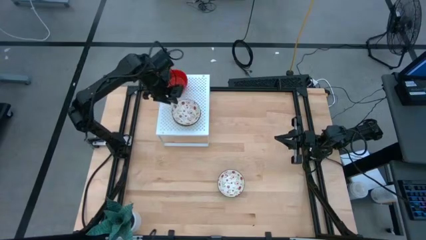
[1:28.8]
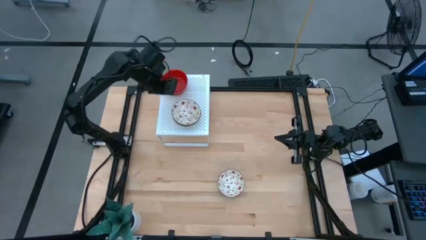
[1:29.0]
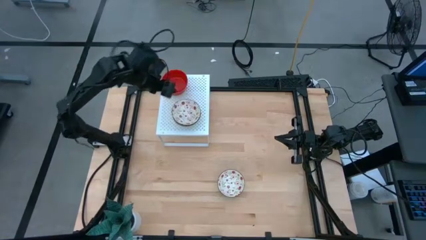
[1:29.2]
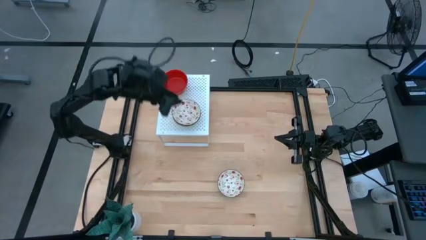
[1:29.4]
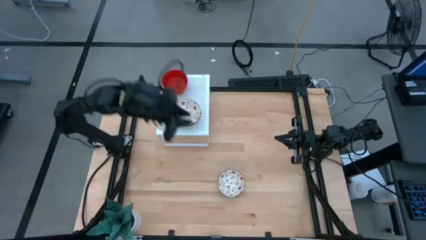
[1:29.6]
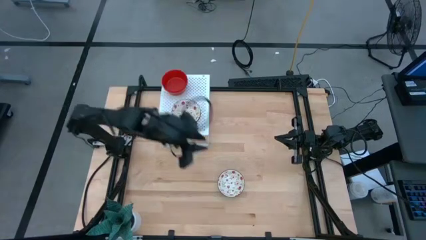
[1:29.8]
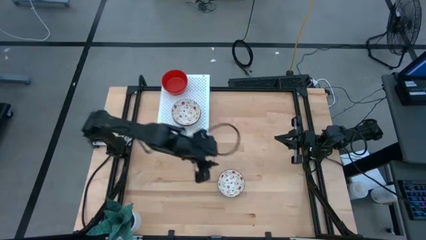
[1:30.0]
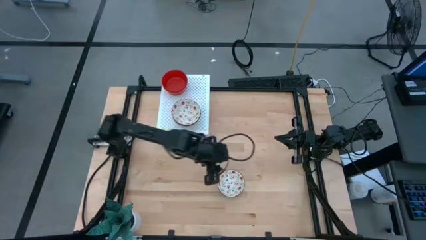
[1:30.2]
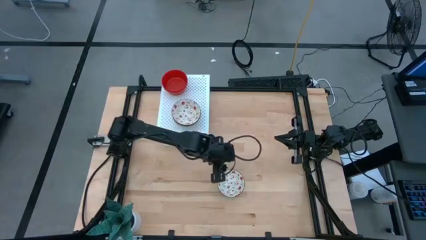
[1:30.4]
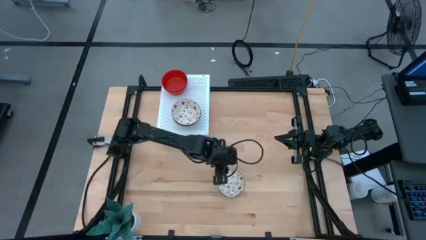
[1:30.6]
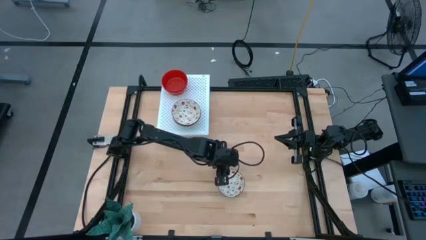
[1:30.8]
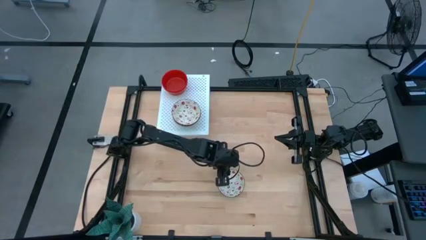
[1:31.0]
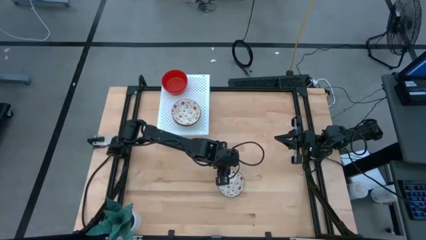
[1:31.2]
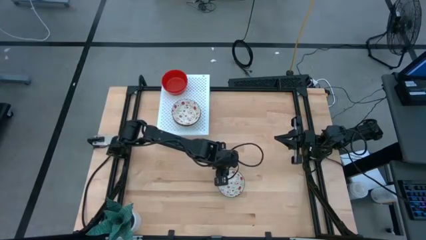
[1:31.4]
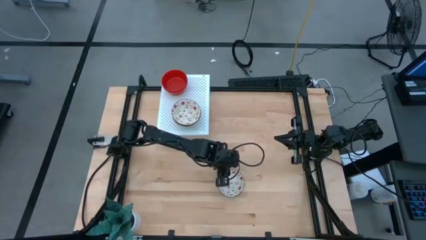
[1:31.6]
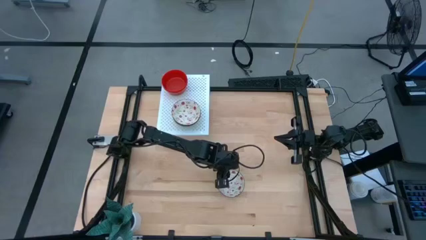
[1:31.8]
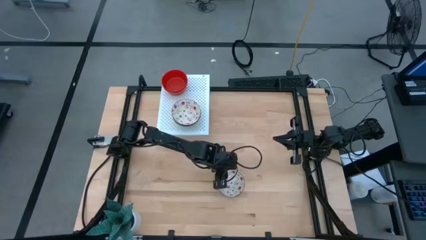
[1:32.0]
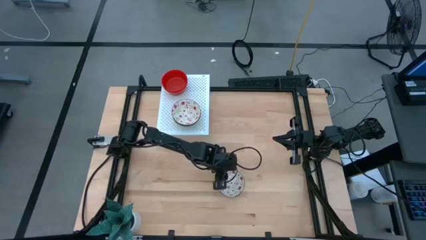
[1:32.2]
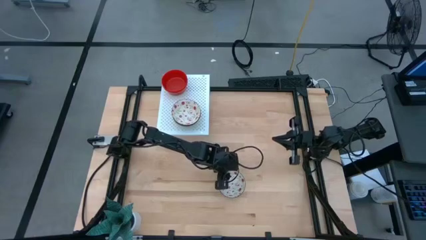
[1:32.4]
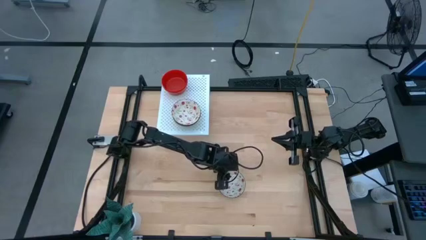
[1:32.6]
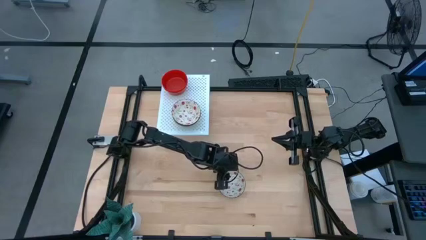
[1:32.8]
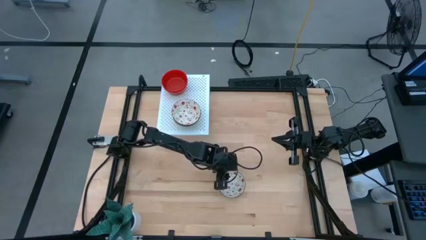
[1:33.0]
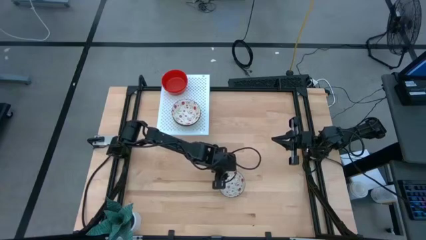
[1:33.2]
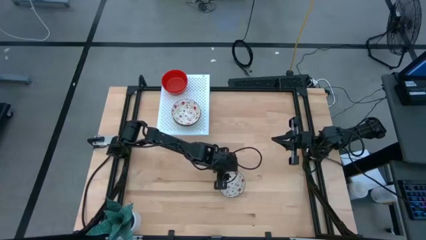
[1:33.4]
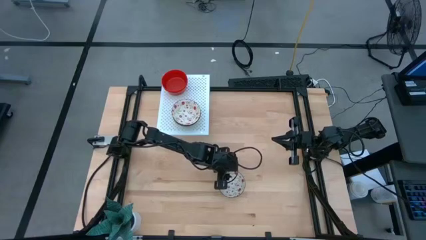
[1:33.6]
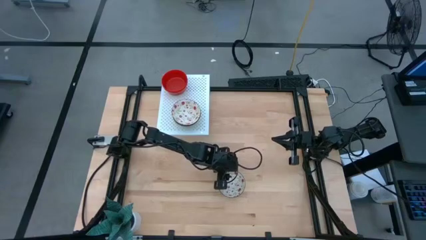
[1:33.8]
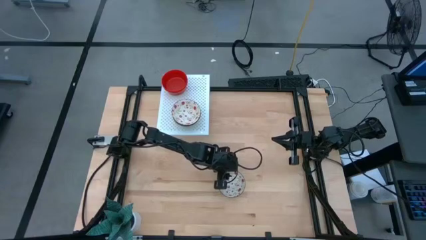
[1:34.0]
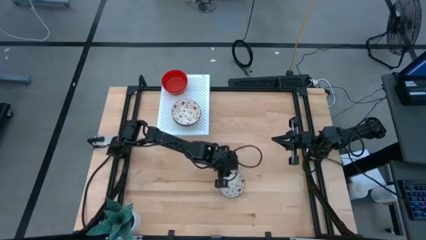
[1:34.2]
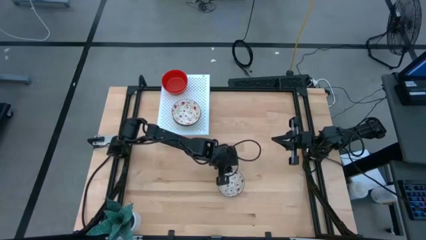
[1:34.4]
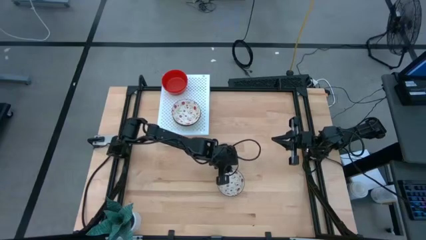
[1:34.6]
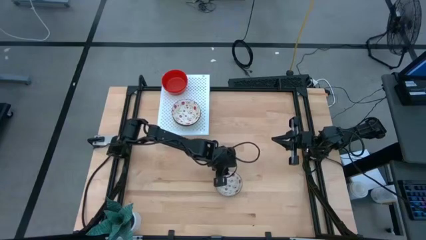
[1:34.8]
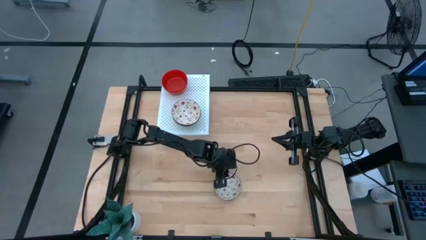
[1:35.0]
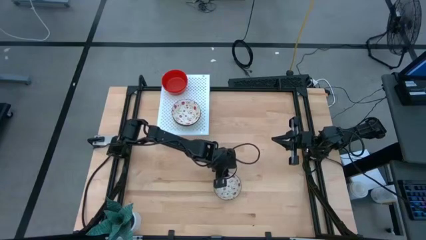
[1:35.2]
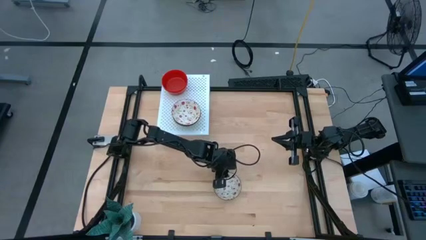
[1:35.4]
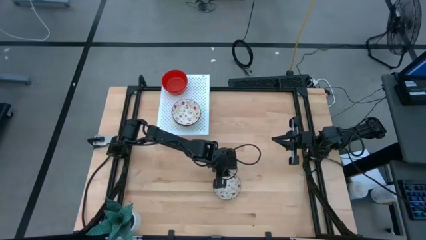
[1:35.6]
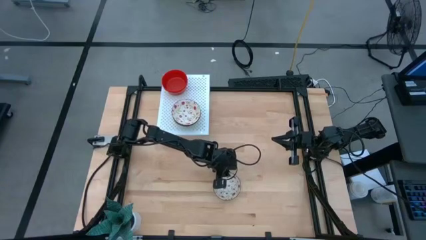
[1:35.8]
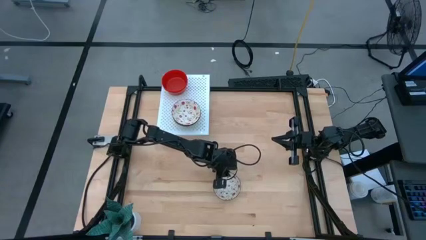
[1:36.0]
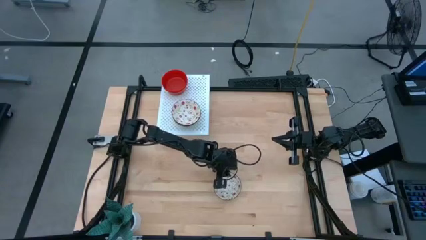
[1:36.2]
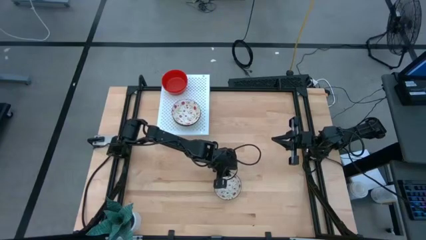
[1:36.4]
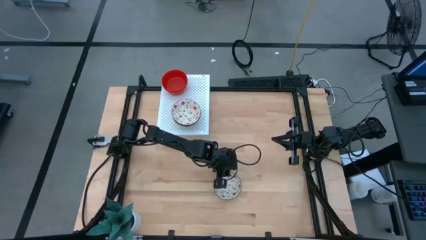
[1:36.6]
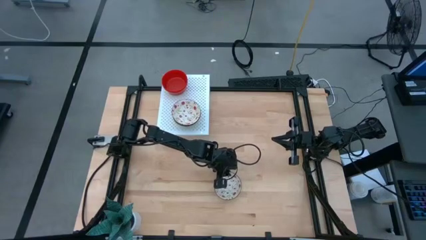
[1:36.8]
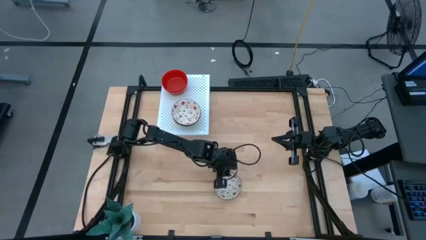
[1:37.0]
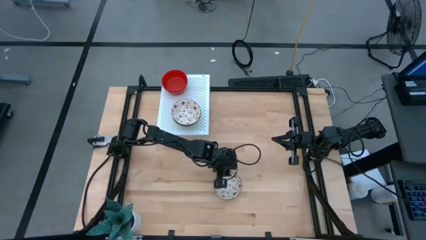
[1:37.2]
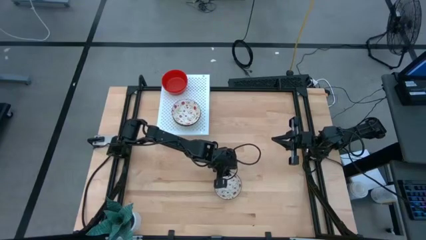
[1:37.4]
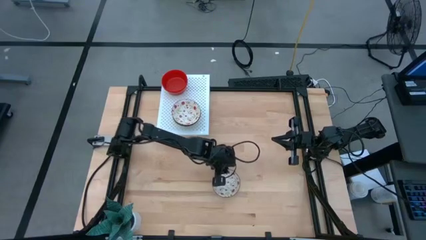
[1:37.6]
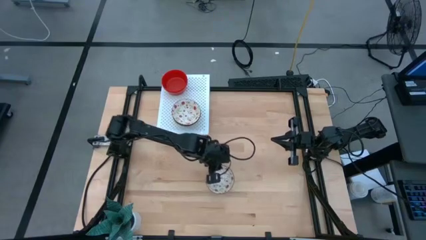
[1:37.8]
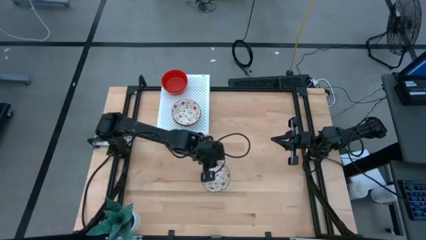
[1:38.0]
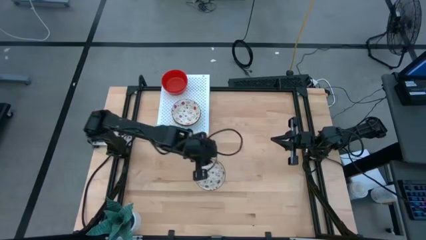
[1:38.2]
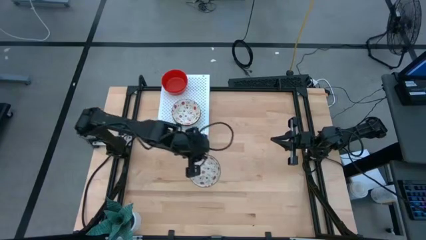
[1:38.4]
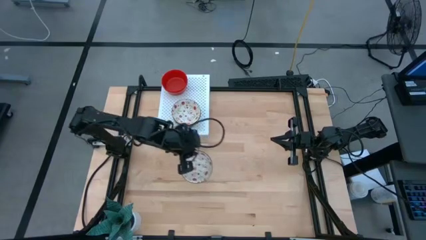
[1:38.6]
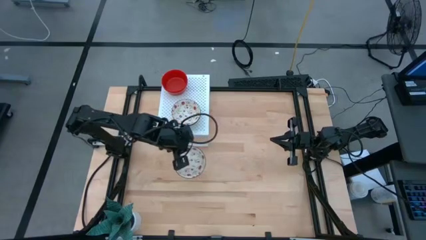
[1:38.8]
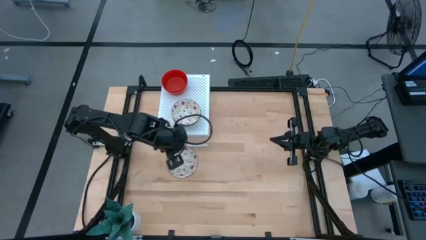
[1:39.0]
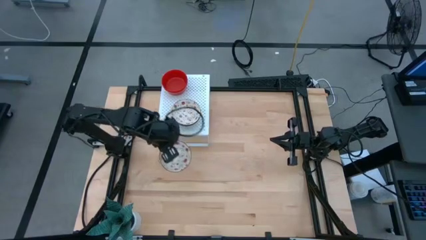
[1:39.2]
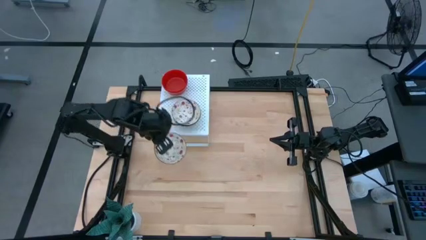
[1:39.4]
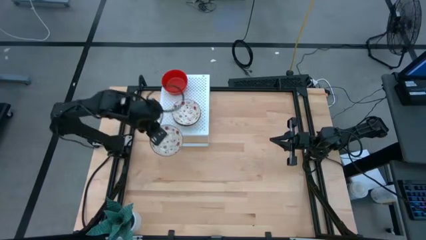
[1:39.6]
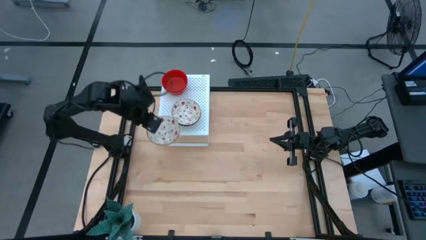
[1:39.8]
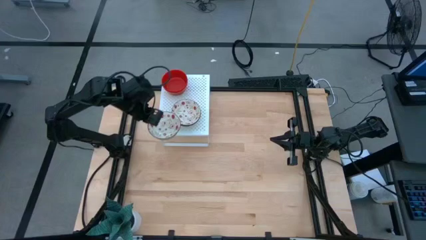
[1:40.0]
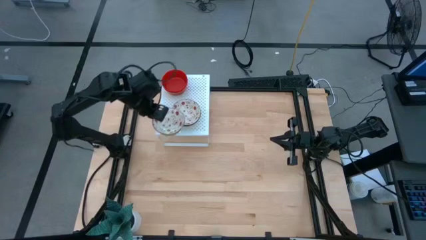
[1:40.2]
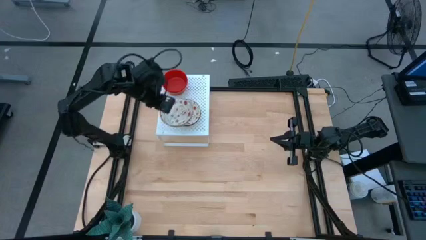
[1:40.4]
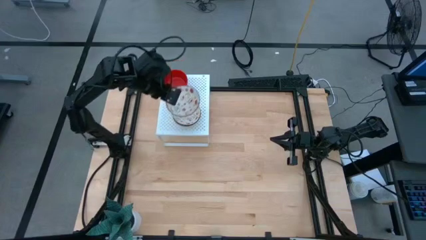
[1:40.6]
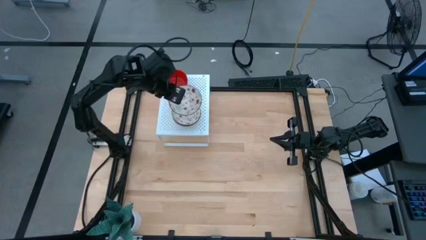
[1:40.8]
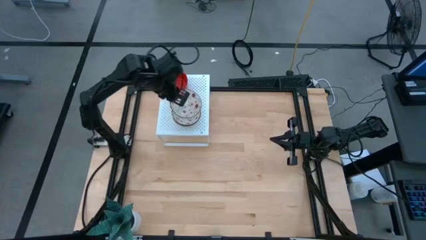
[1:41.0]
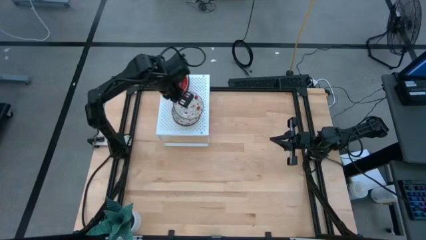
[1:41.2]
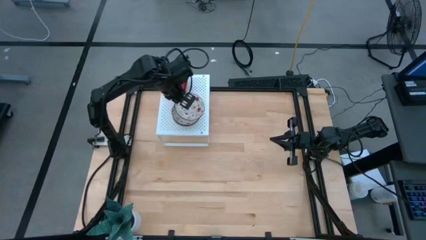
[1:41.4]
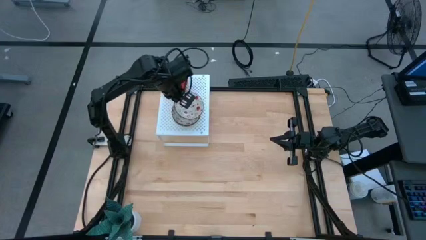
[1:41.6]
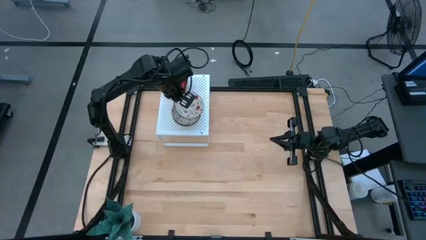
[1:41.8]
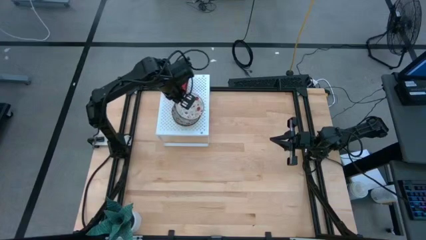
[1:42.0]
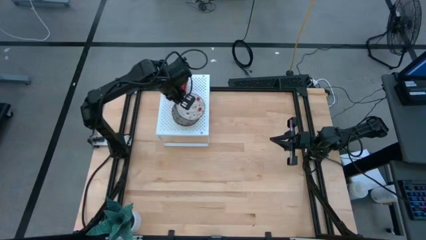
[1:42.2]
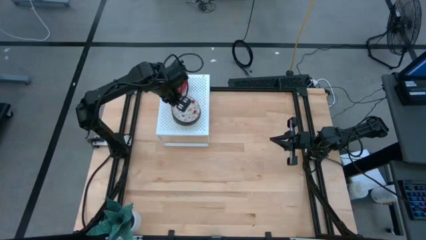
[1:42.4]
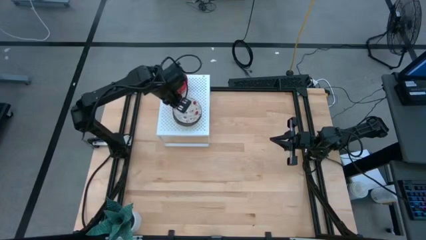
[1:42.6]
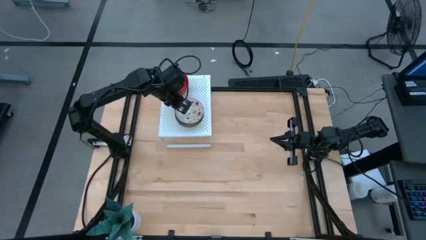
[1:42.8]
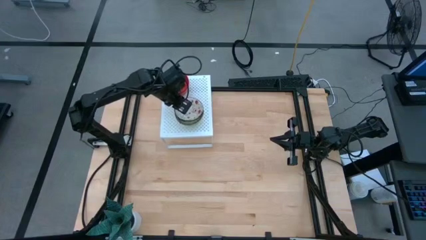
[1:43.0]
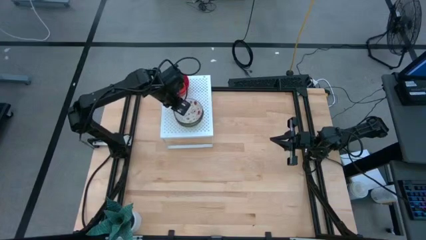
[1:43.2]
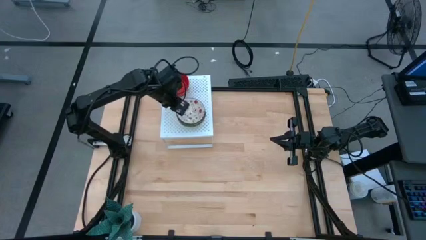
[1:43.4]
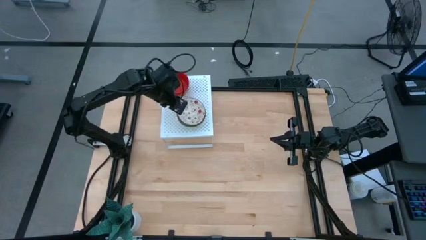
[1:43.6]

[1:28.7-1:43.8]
Task: Pick & Place Mini bowls
Stack the white patterned bowl on top of the white patterned bowls on the shelf
